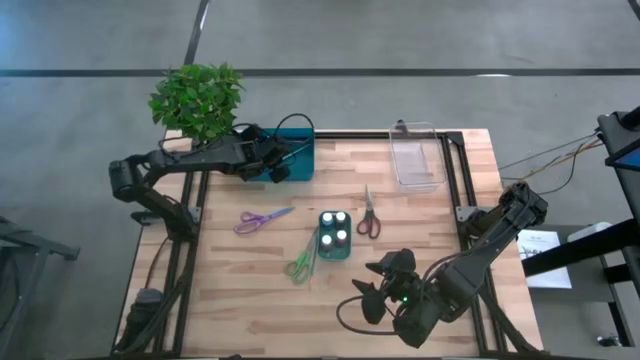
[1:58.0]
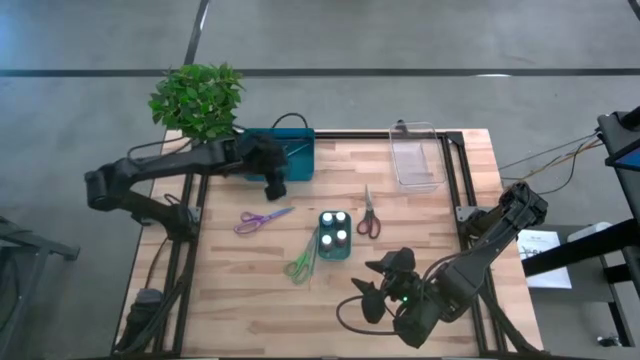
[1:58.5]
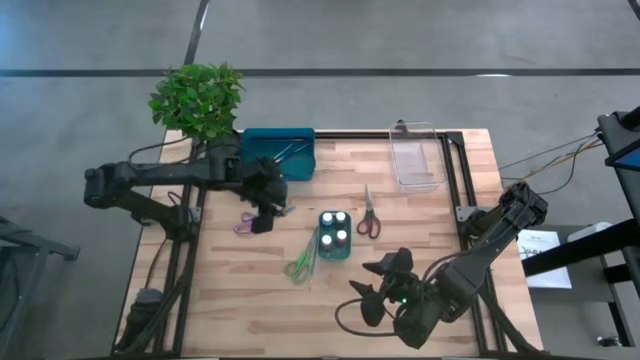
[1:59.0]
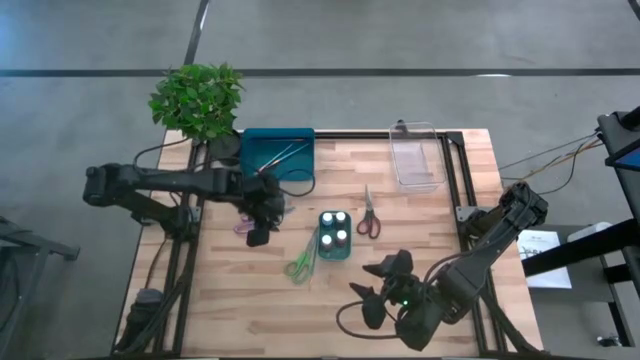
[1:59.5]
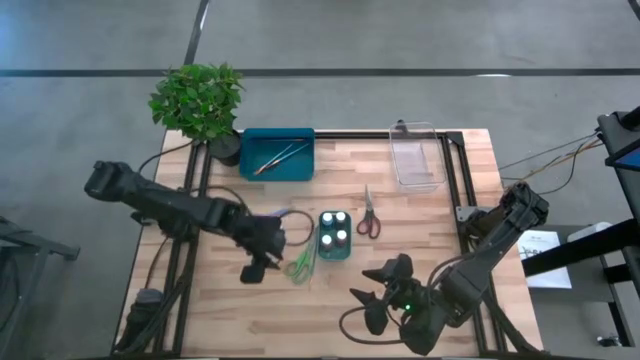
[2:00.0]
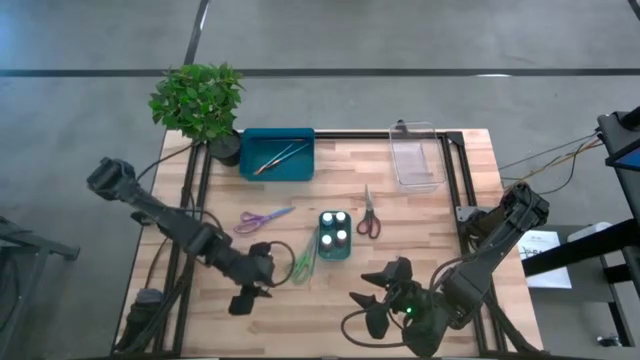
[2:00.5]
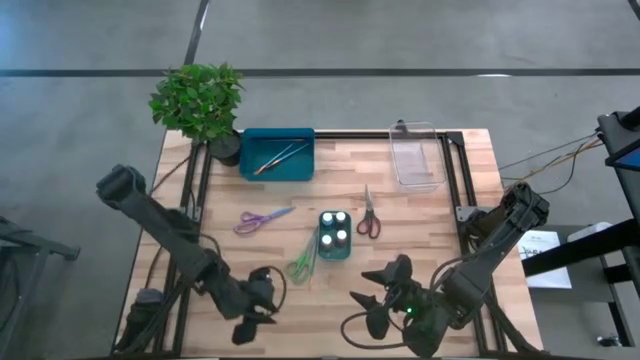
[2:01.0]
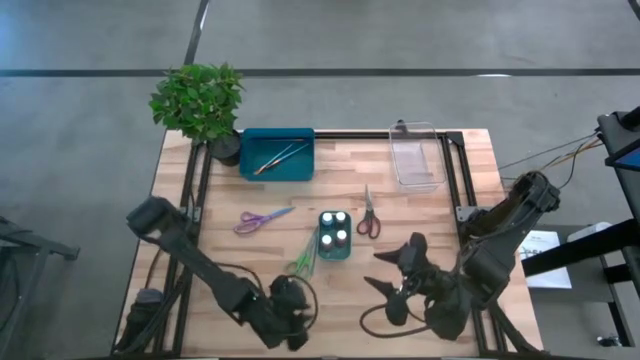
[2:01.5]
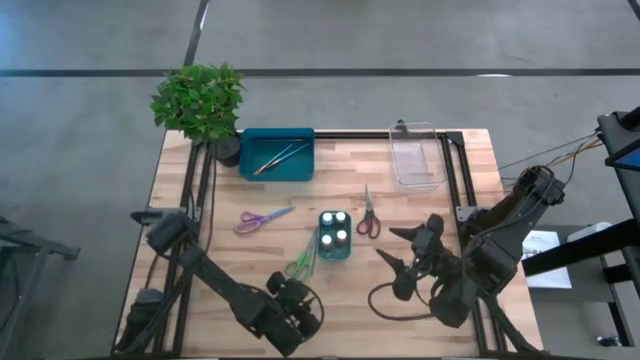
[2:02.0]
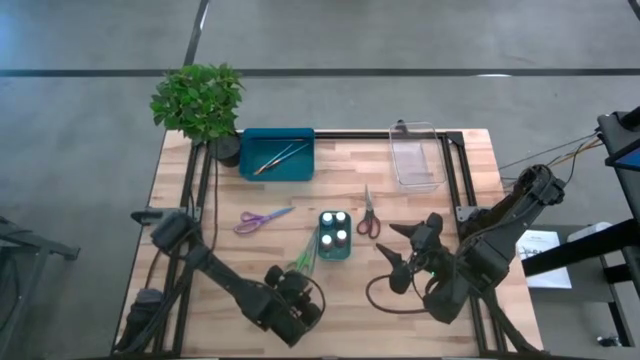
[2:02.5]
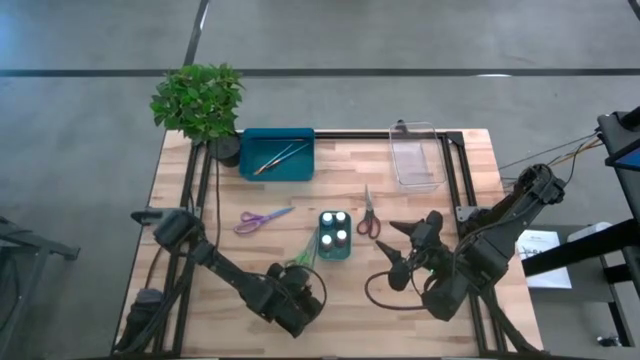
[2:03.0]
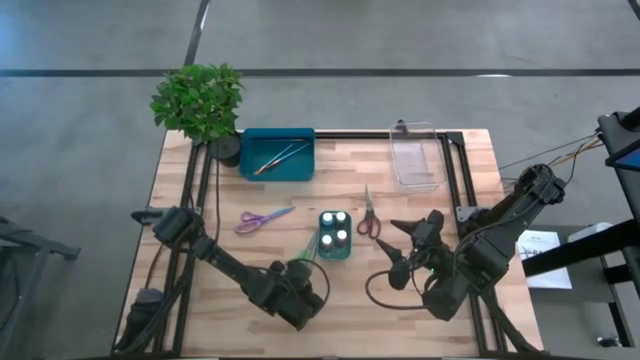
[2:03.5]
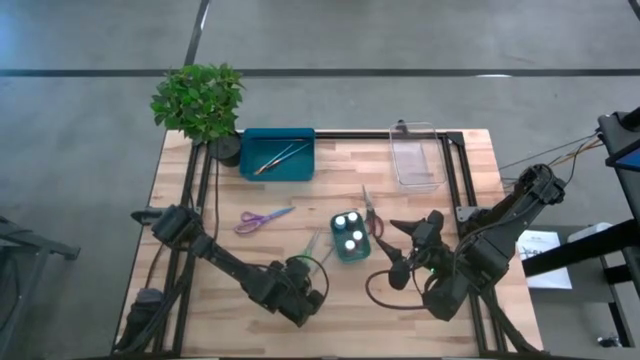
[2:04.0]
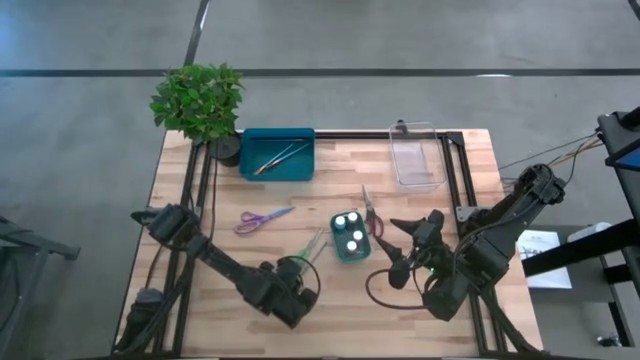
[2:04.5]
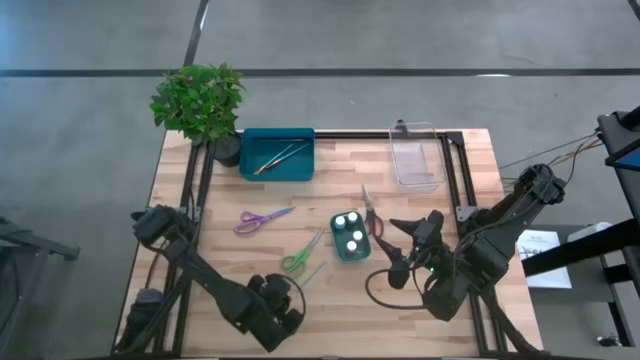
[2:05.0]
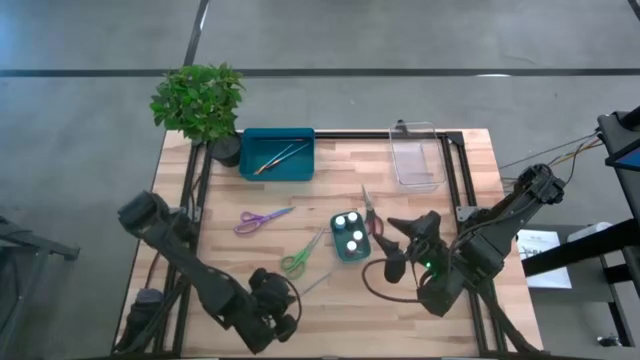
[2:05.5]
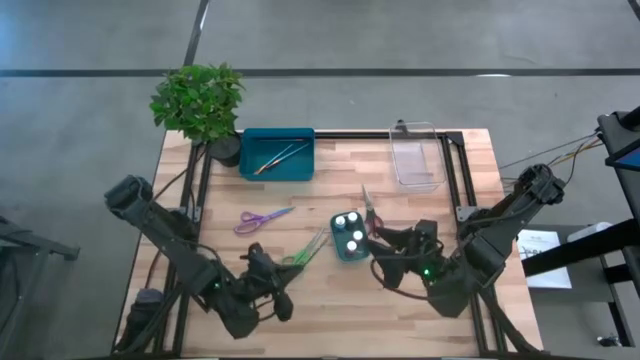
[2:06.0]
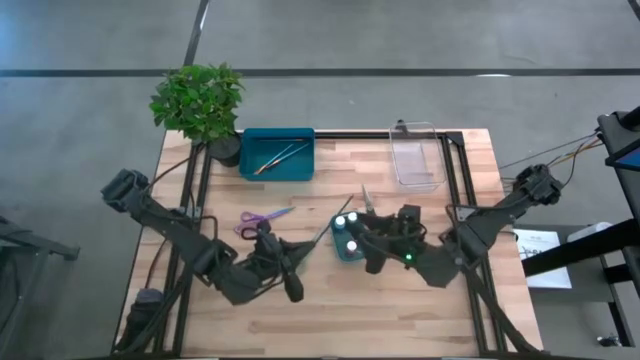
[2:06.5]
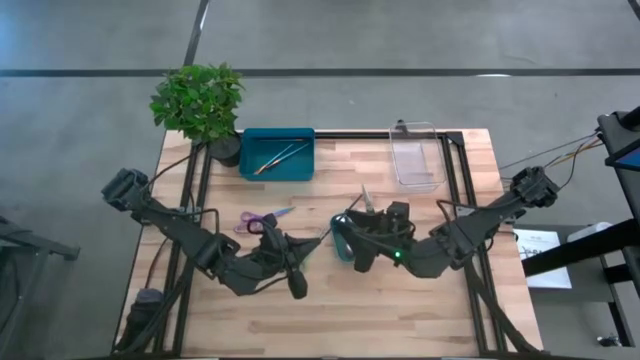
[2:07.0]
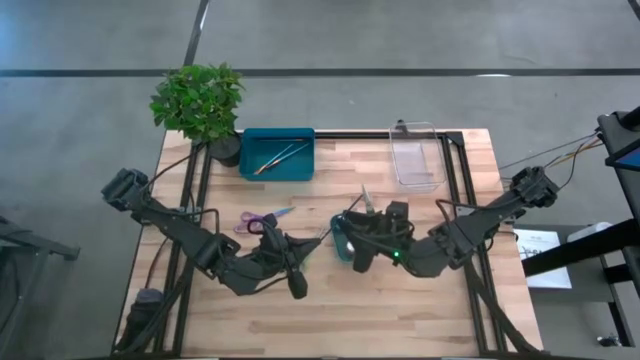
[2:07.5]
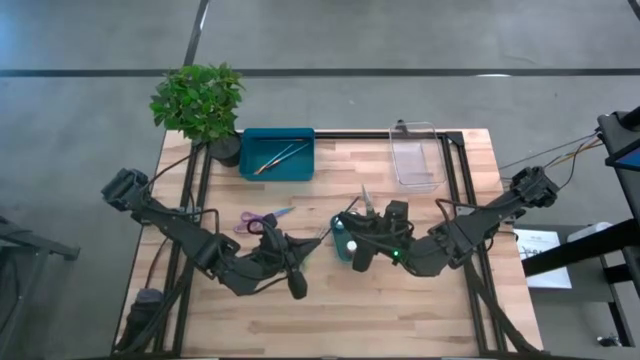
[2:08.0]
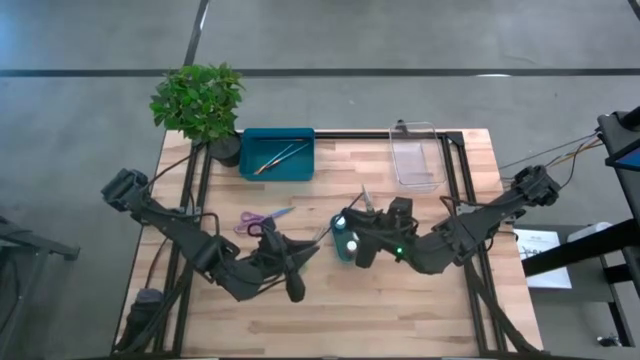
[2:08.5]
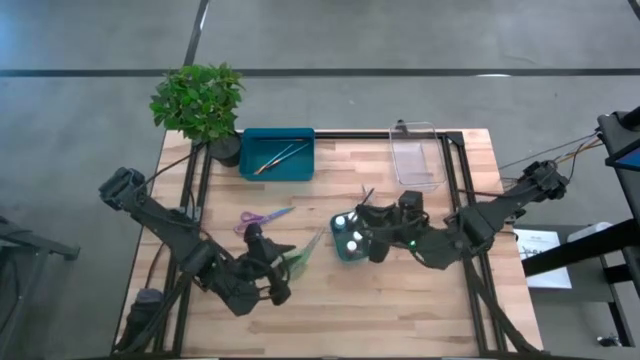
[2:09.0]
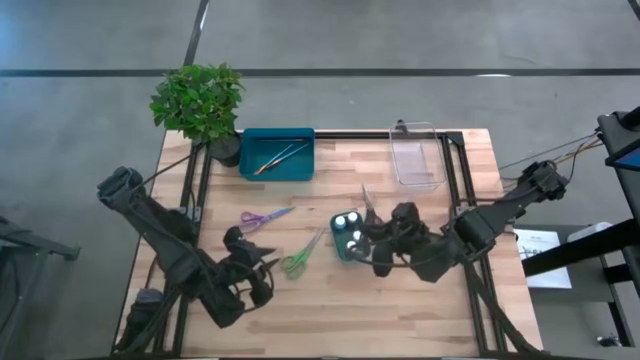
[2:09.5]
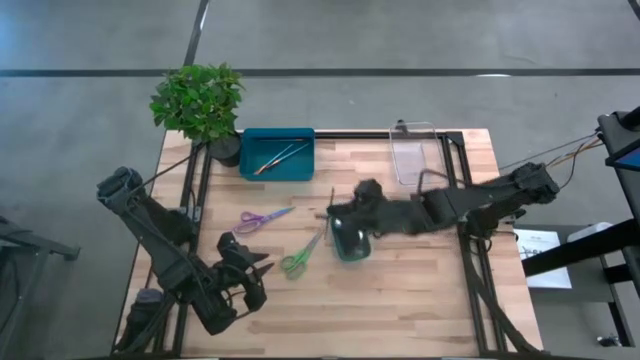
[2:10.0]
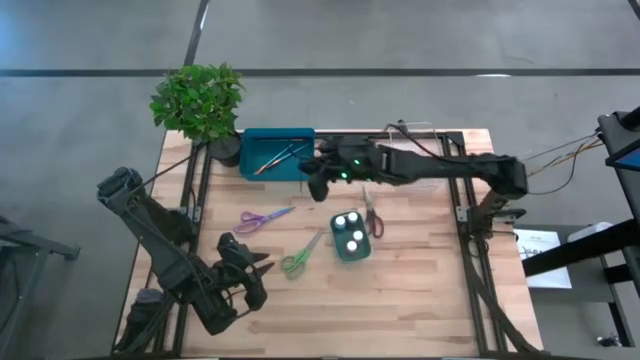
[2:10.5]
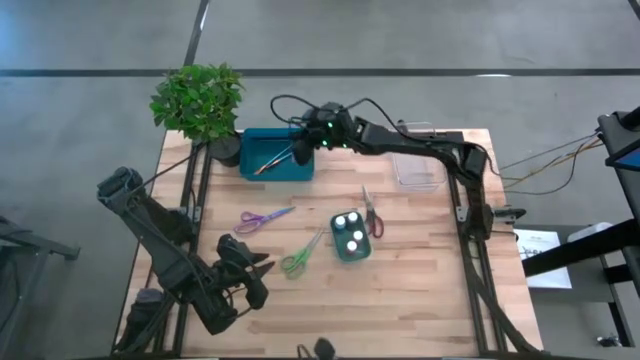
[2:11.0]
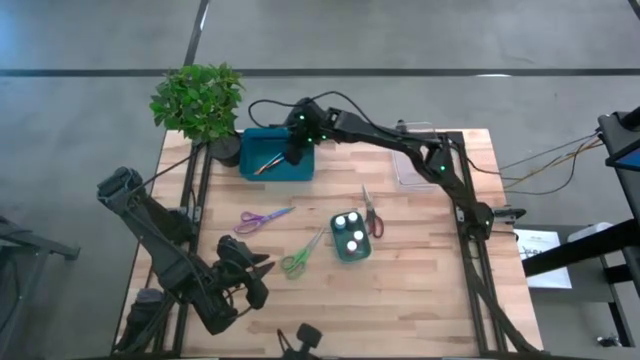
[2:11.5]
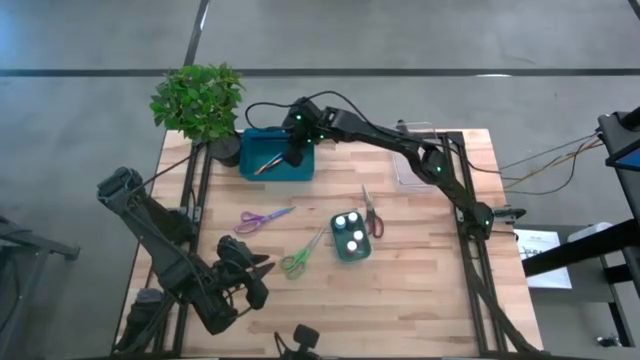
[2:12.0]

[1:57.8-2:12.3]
Task: Pick & Place Paint Supplies
Put the small blue paint brush into the blue bin

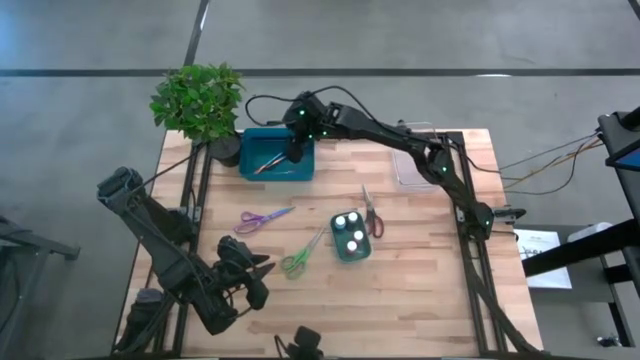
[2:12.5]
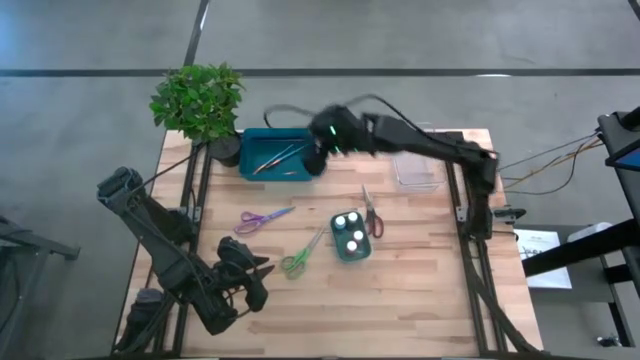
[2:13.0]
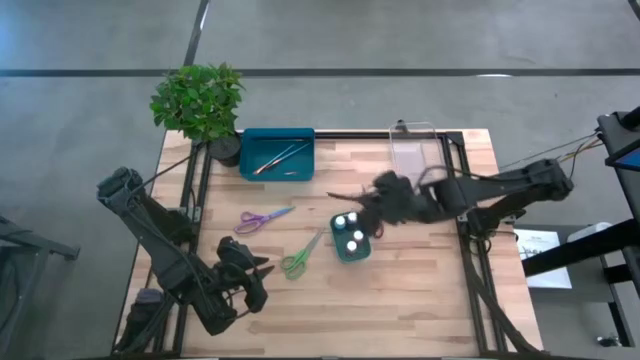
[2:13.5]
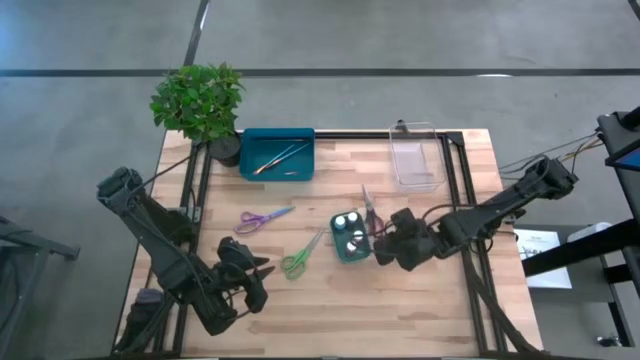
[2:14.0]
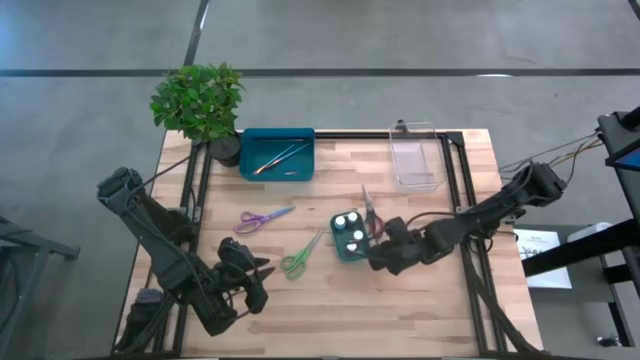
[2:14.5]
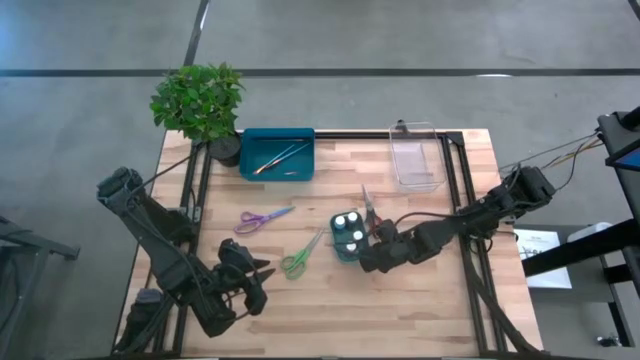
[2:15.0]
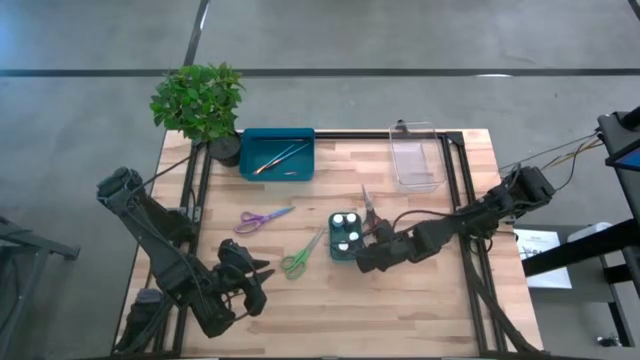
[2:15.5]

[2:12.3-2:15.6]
Adjust the blue bin
